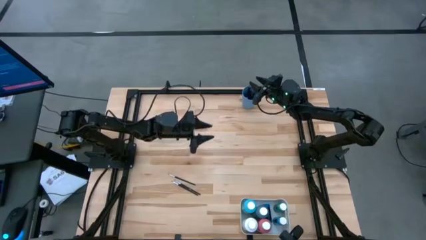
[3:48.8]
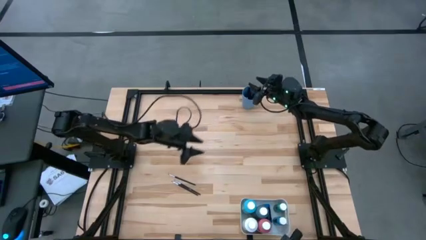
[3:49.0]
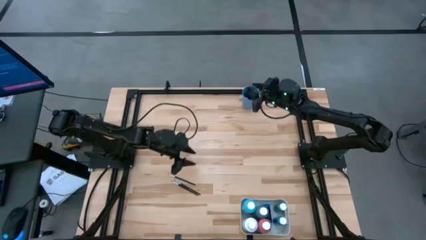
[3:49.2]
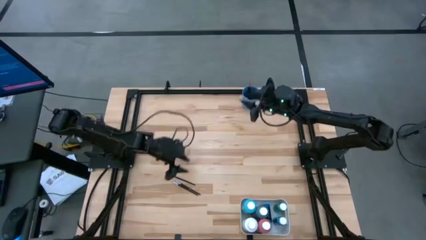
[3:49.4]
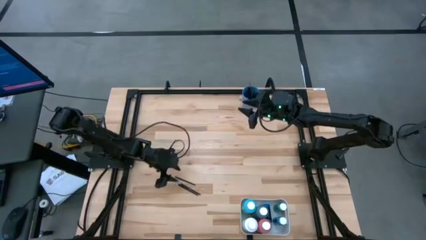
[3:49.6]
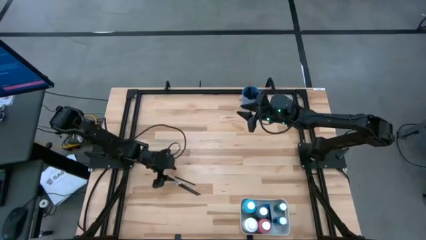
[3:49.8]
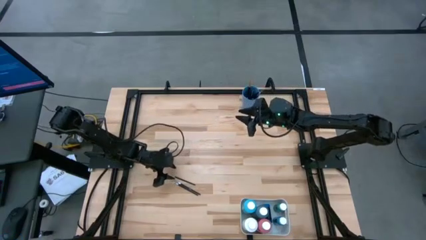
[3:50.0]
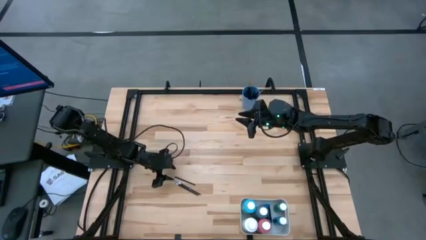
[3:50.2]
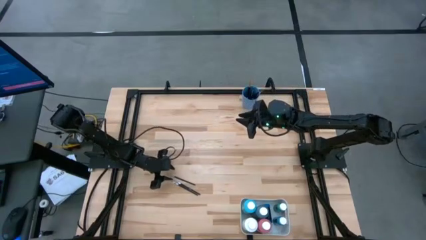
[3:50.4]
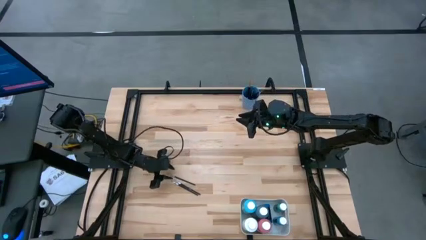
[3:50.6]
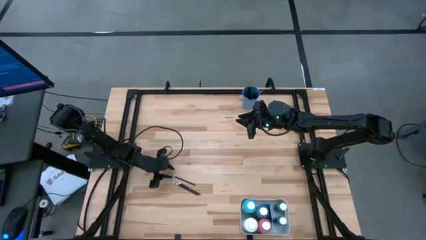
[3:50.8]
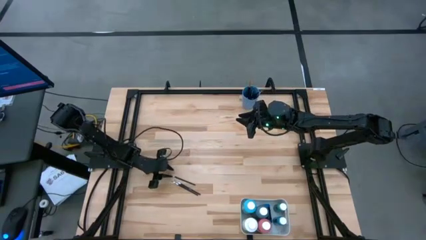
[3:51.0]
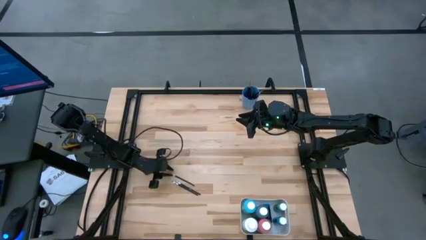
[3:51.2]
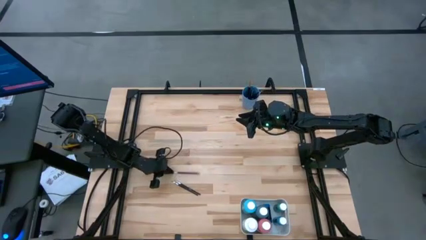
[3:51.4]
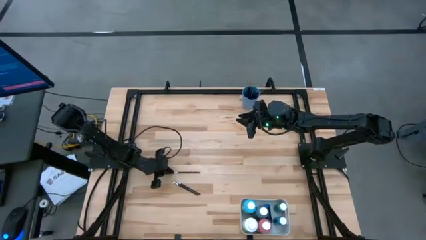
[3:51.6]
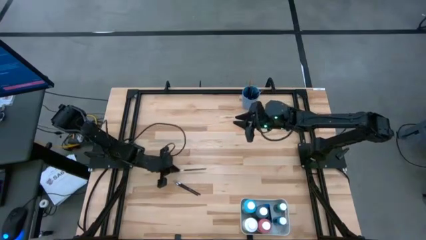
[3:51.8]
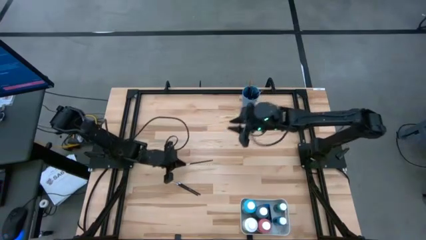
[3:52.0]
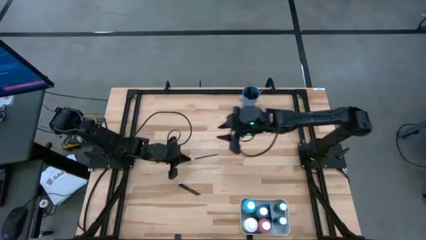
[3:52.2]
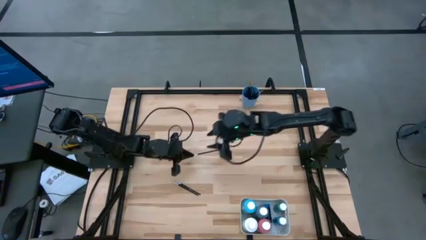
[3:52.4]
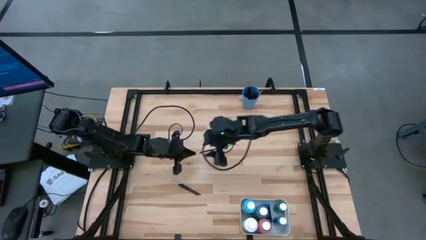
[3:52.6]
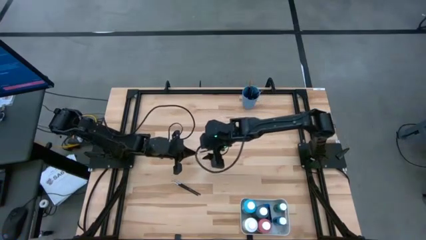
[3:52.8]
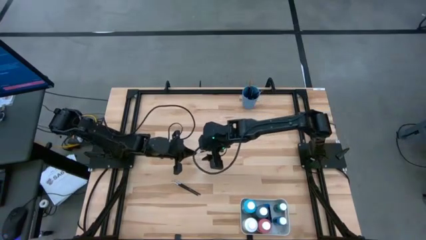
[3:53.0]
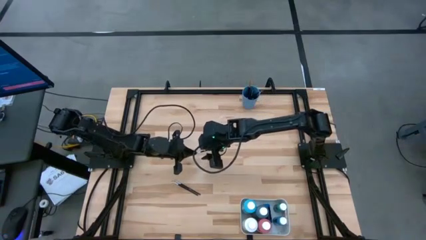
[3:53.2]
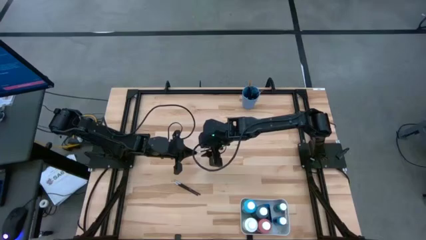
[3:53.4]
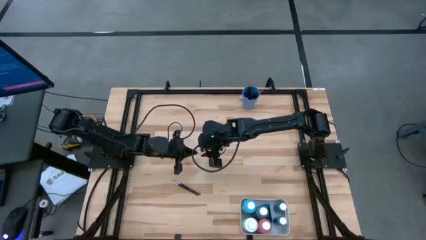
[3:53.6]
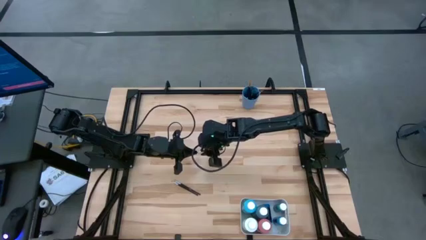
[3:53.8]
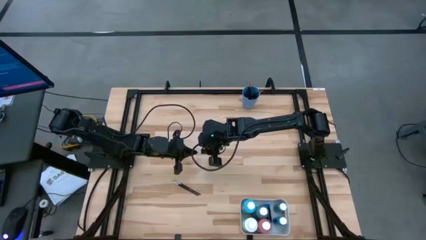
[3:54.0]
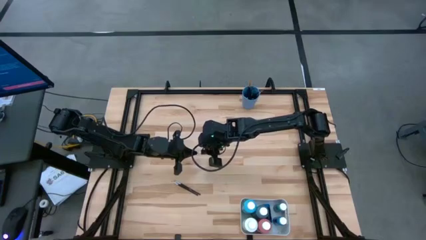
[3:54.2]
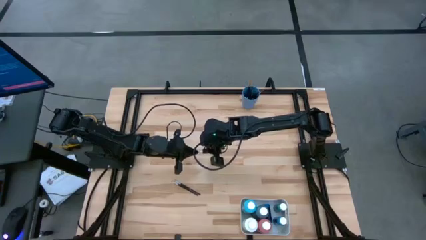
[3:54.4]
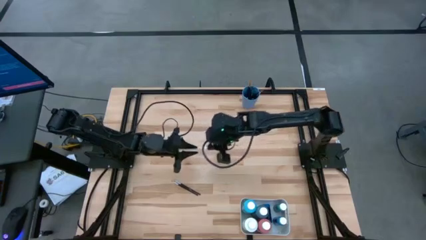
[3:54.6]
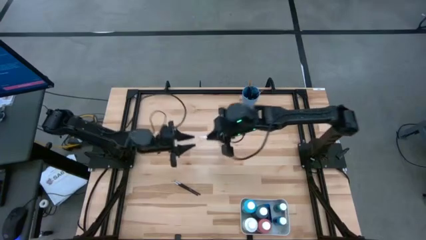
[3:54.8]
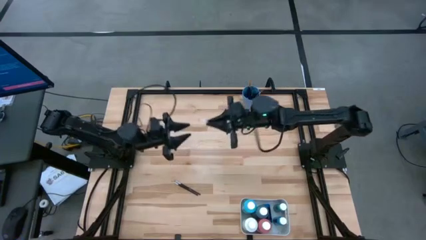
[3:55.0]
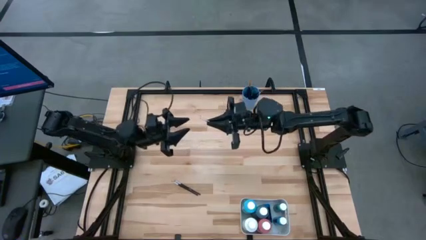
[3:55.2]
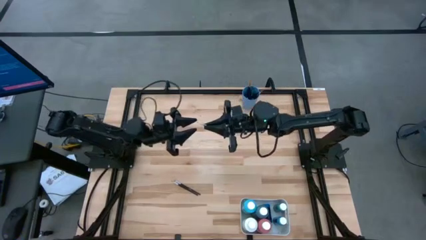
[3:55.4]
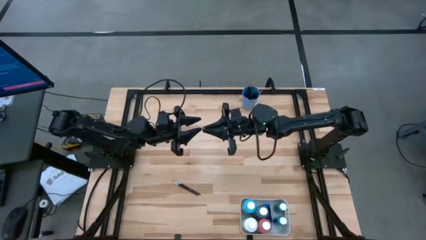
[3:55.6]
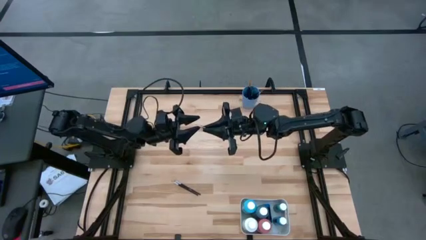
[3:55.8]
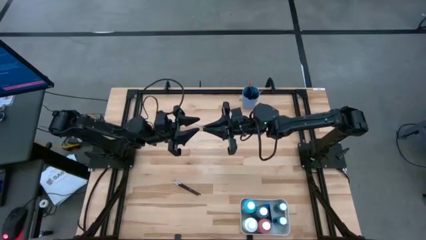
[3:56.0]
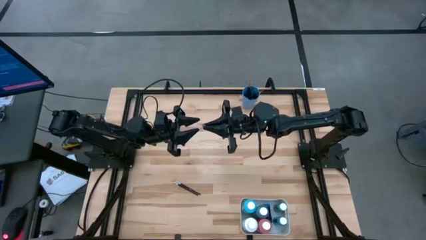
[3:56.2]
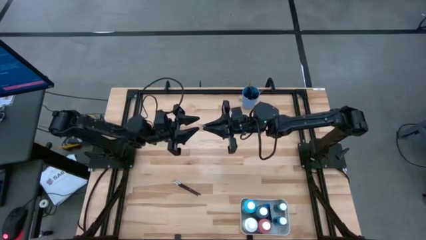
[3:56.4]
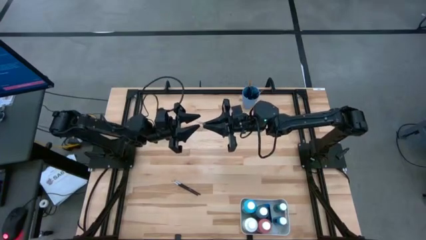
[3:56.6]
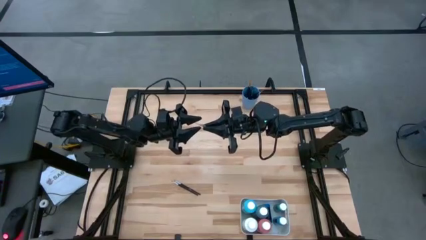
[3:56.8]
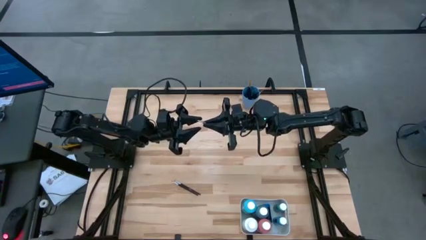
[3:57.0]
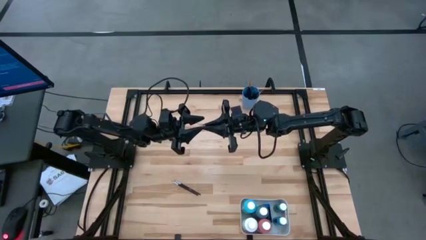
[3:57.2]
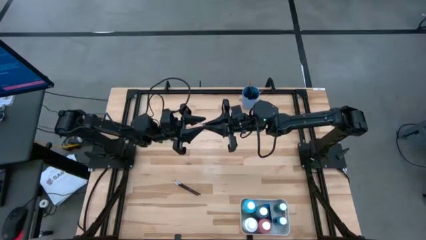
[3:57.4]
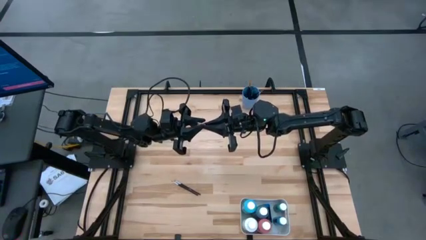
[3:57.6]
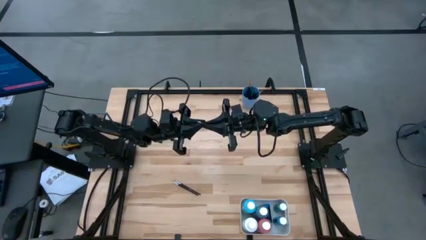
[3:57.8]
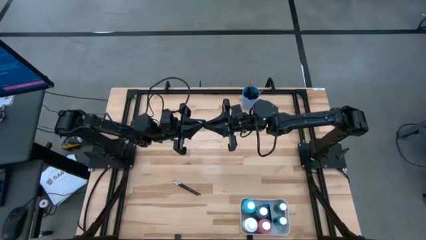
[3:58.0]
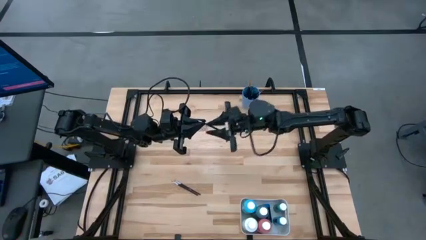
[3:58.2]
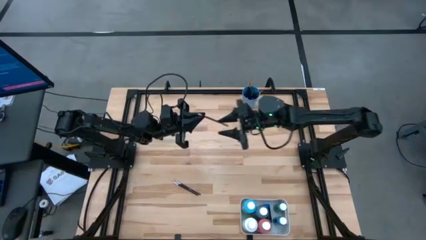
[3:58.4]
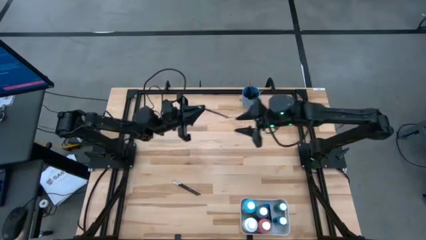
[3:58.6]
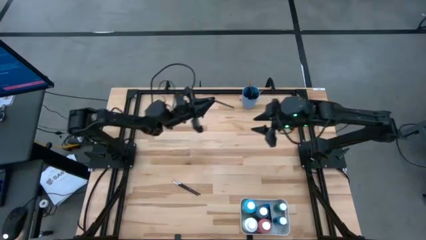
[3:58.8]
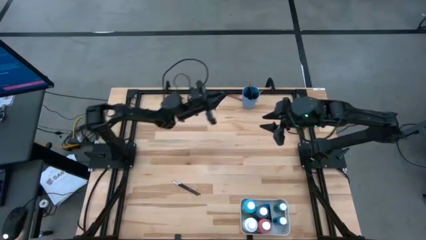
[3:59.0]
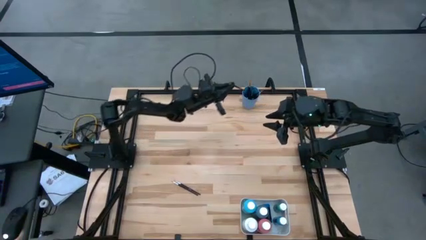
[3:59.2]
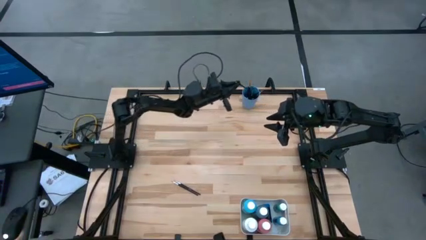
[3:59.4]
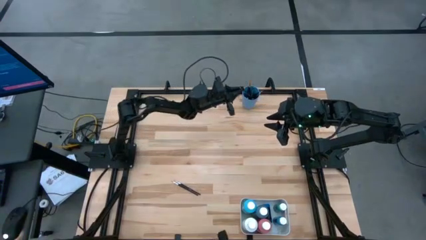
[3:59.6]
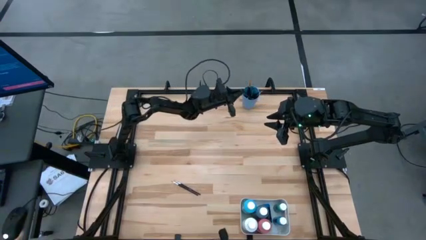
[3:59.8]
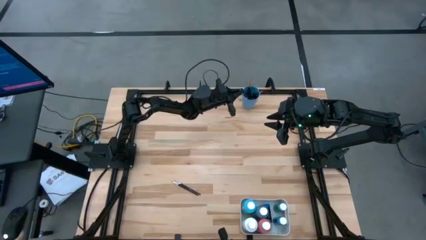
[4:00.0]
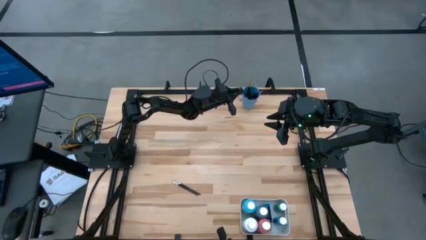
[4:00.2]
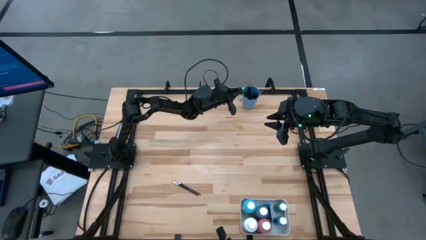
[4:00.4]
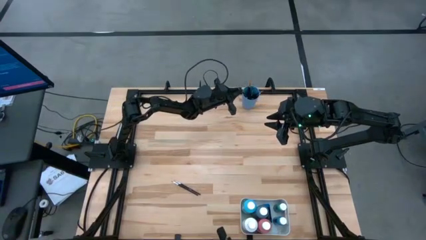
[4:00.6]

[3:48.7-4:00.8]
Task: Pick & Place Paint Supplies
Put the silver paintbrush into the blue cup

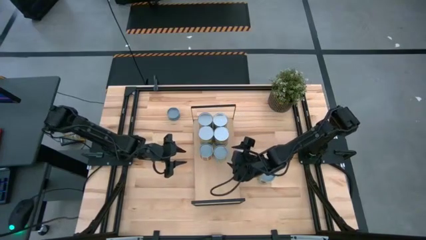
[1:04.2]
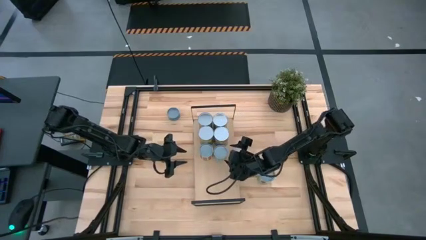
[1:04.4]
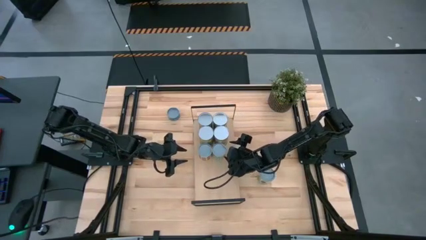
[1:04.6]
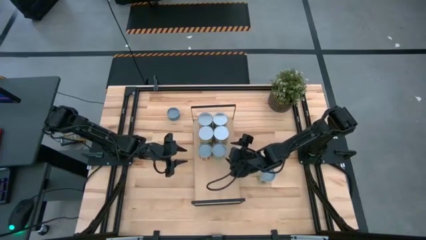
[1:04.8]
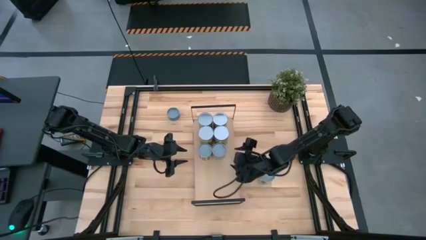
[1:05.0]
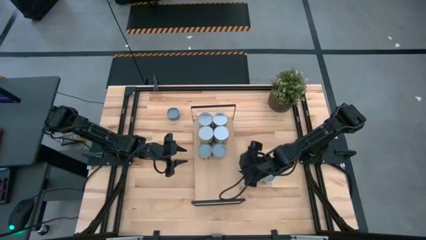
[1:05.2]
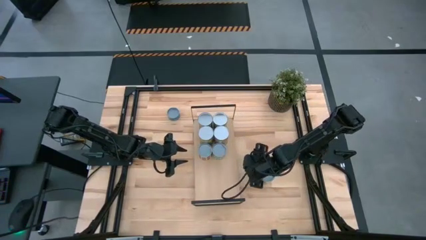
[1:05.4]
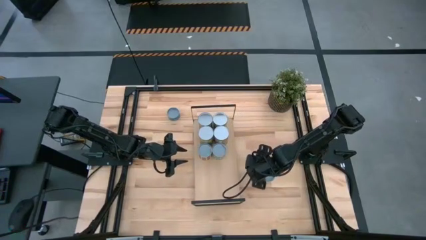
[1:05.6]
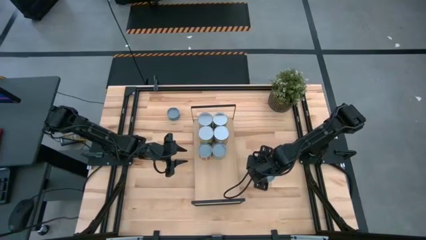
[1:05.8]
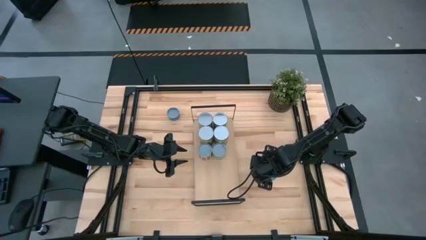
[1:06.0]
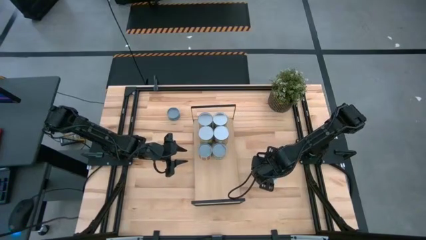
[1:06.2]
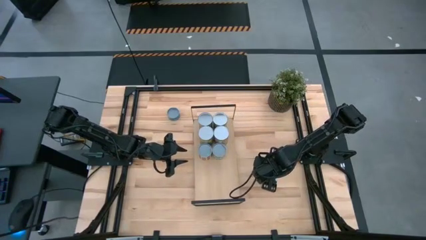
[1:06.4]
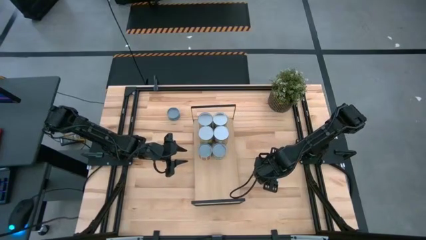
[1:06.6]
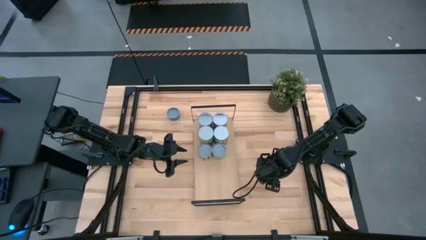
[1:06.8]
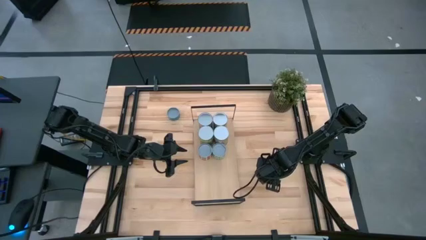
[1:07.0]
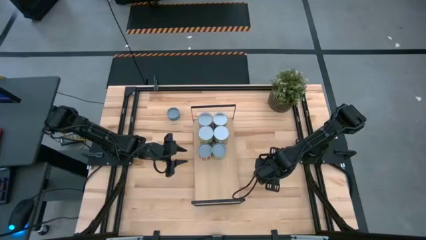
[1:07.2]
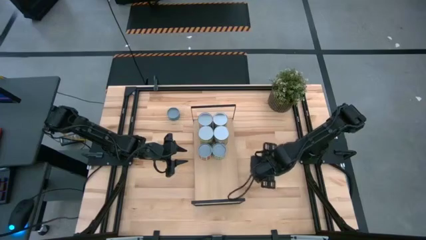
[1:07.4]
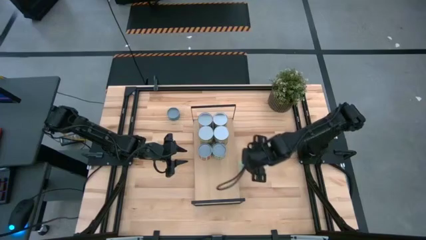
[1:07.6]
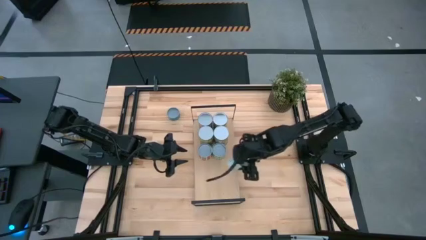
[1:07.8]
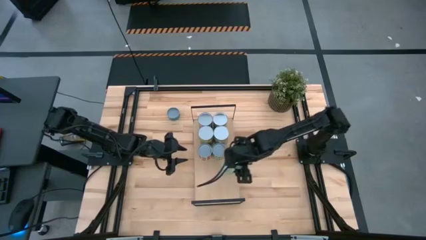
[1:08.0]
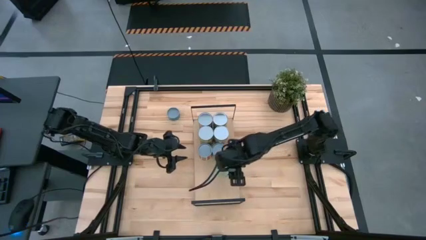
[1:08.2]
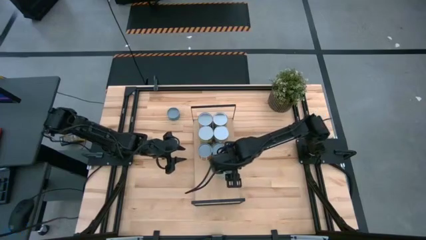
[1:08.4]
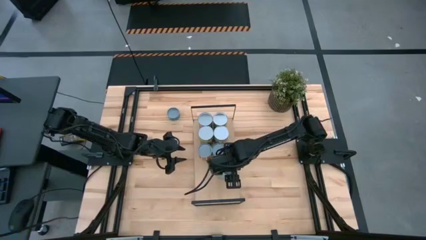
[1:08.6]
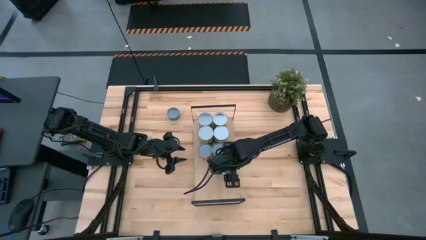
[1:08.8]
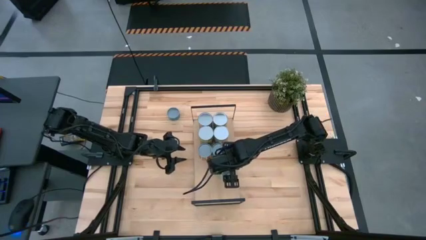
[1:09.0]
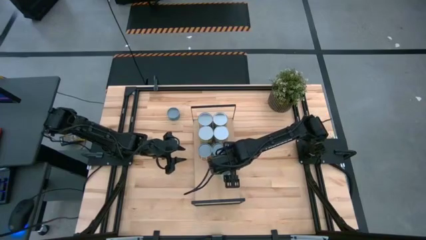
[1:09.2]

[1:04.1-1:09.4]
Task: Pick and place cans onto a shelf
Put the canned mix veggies on the shelf
